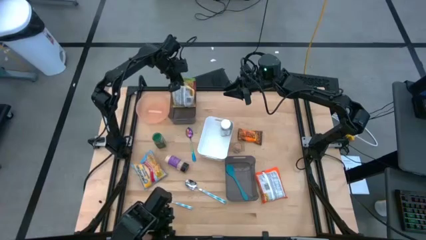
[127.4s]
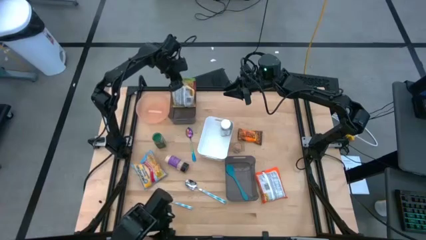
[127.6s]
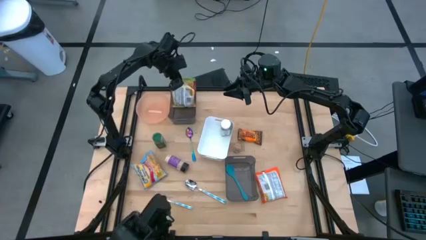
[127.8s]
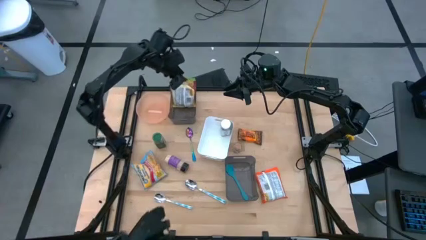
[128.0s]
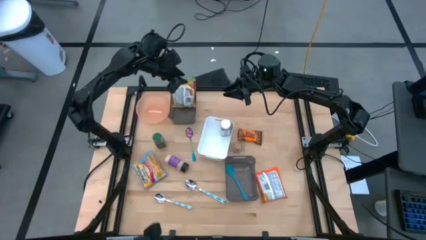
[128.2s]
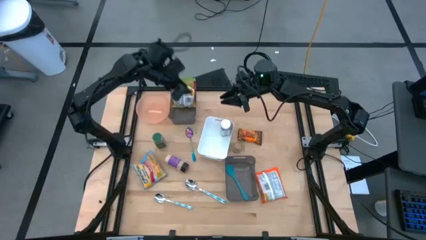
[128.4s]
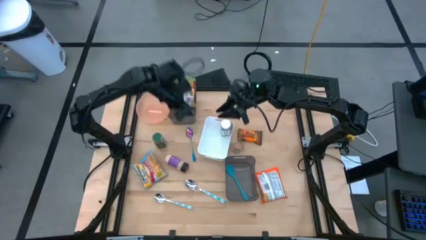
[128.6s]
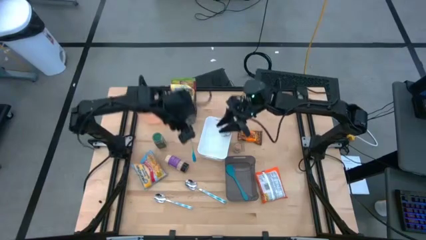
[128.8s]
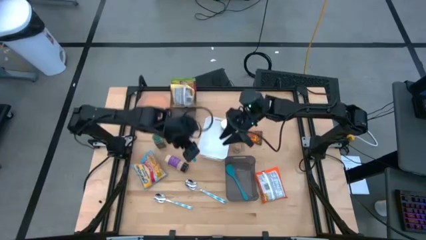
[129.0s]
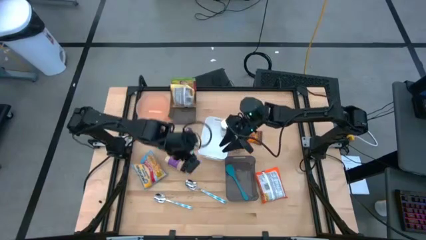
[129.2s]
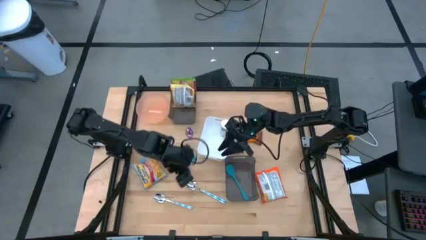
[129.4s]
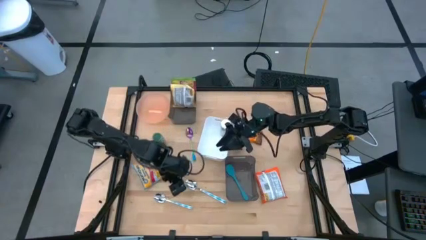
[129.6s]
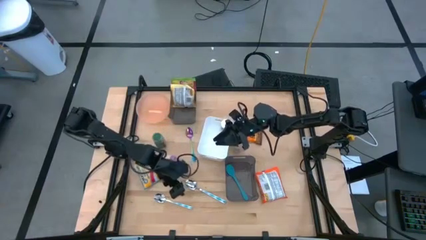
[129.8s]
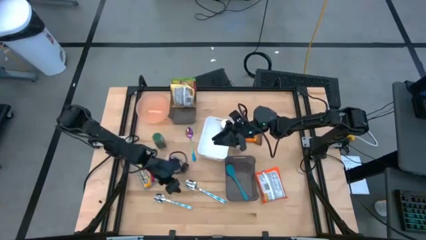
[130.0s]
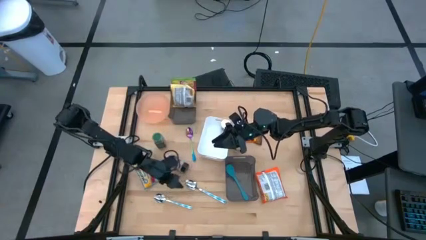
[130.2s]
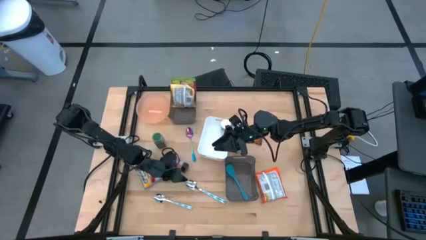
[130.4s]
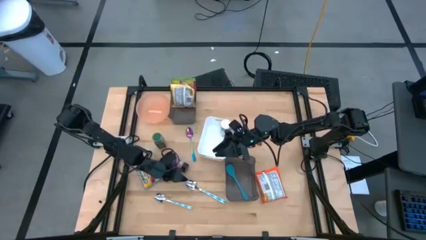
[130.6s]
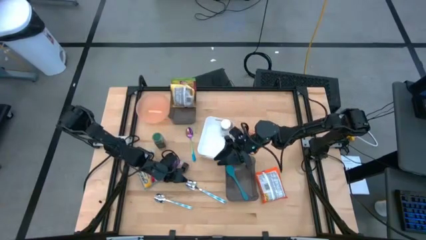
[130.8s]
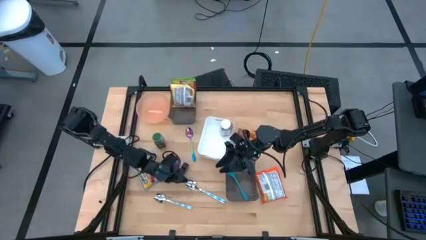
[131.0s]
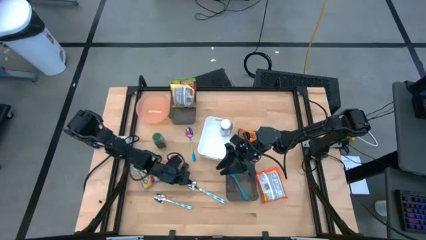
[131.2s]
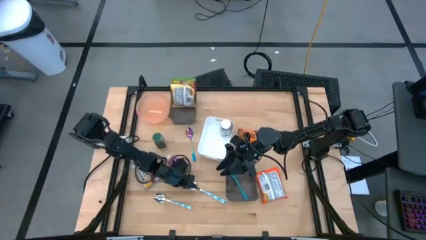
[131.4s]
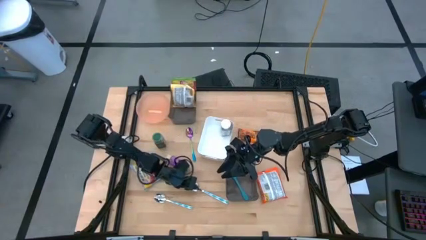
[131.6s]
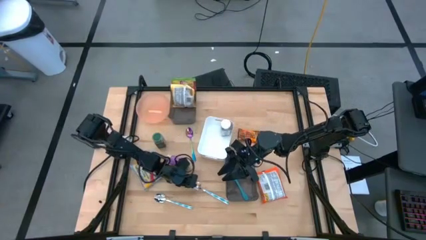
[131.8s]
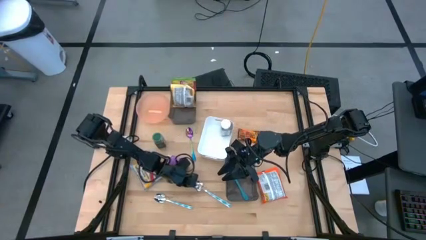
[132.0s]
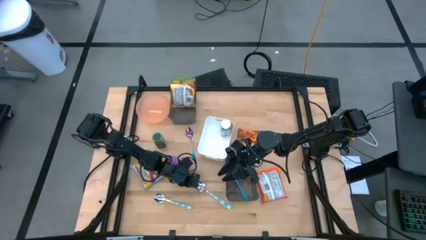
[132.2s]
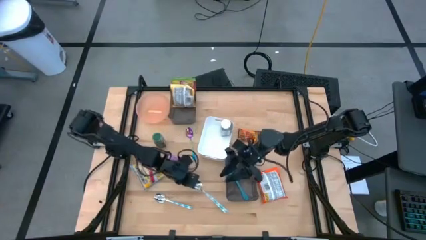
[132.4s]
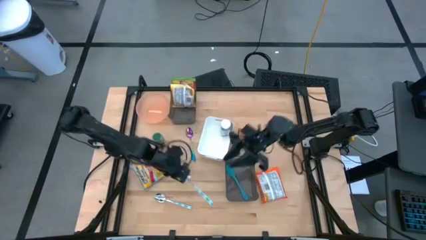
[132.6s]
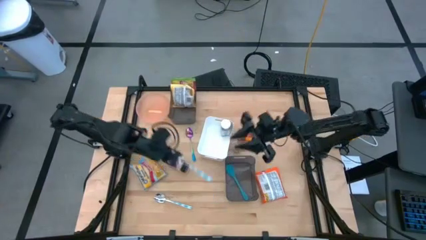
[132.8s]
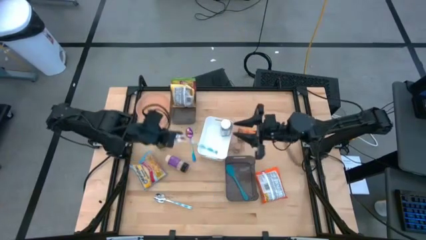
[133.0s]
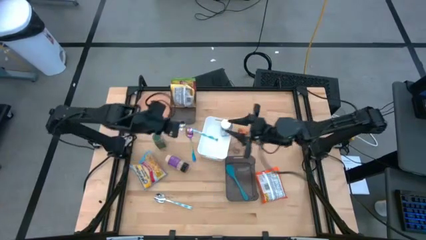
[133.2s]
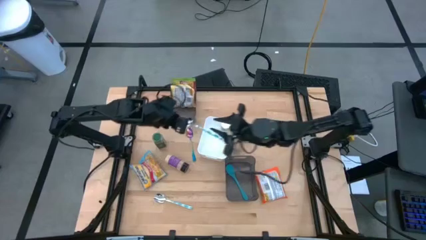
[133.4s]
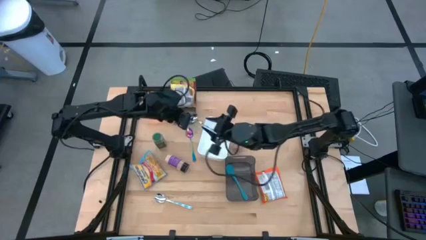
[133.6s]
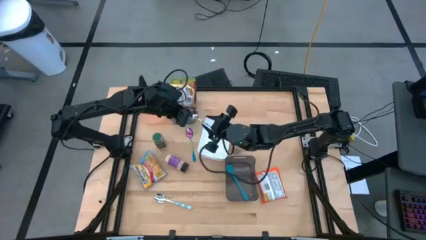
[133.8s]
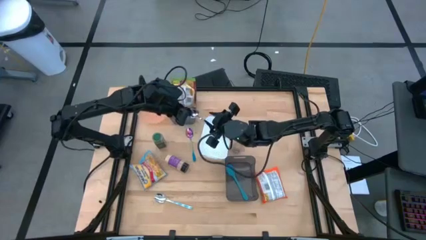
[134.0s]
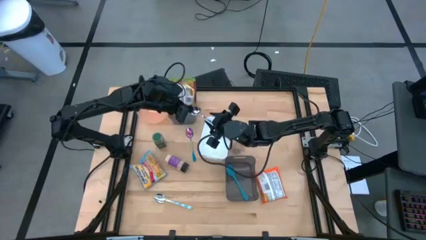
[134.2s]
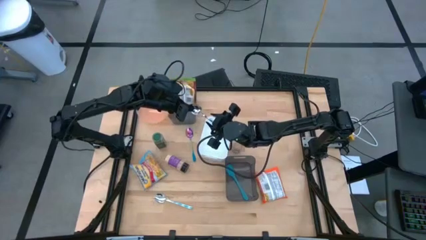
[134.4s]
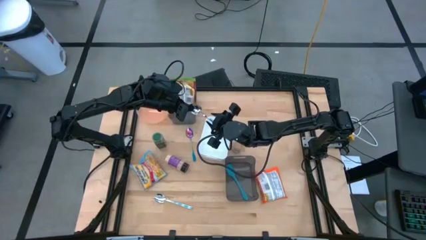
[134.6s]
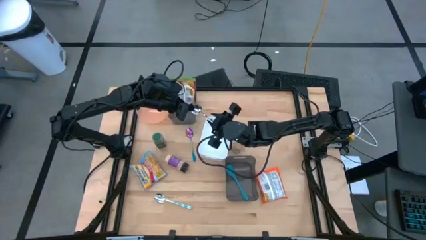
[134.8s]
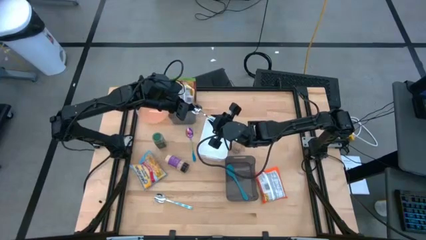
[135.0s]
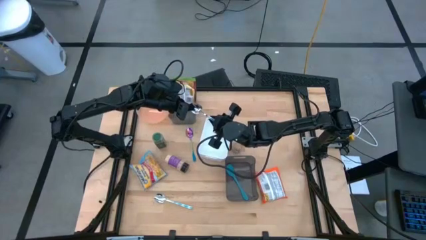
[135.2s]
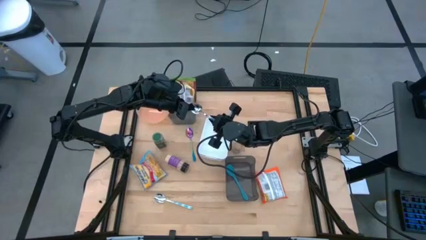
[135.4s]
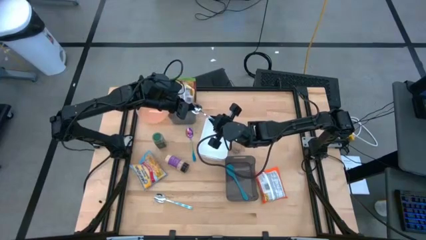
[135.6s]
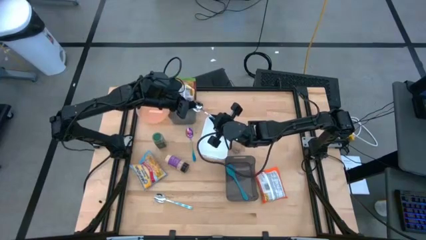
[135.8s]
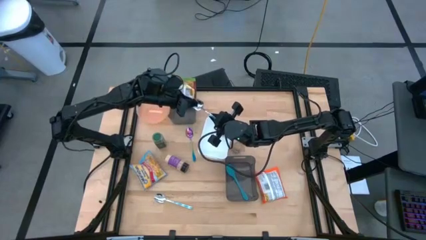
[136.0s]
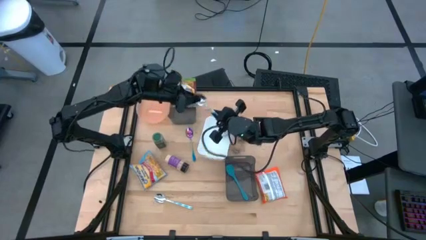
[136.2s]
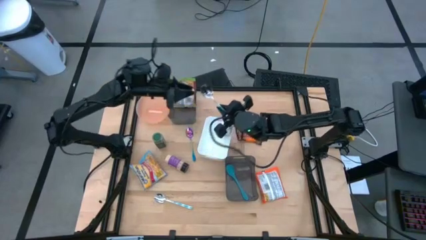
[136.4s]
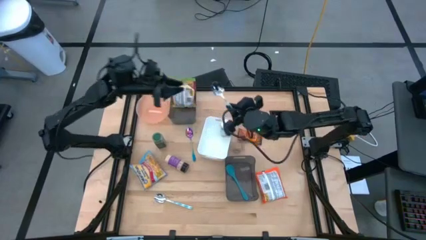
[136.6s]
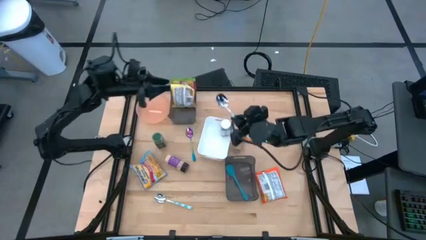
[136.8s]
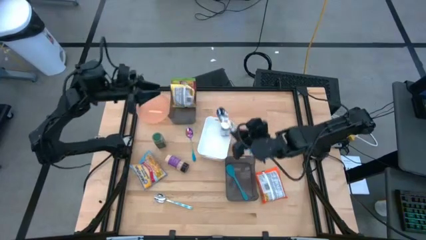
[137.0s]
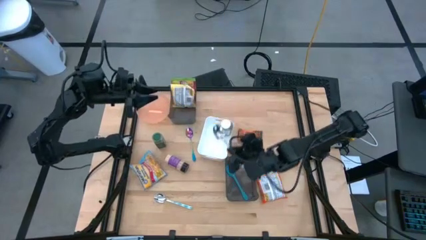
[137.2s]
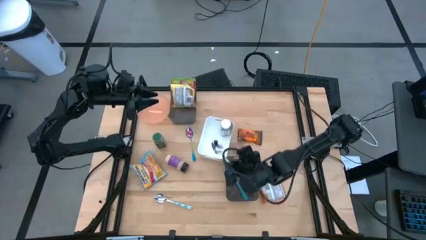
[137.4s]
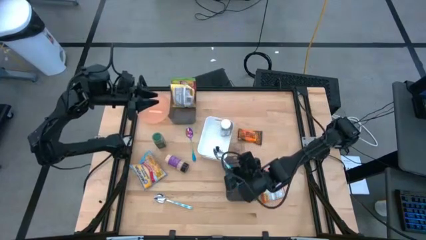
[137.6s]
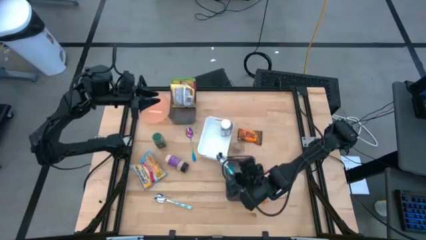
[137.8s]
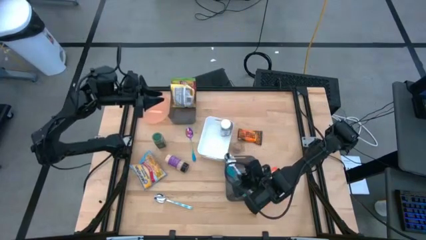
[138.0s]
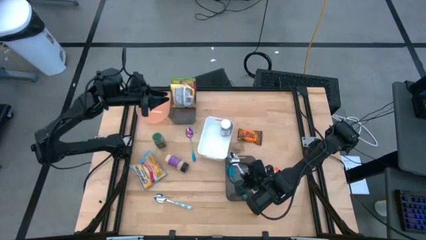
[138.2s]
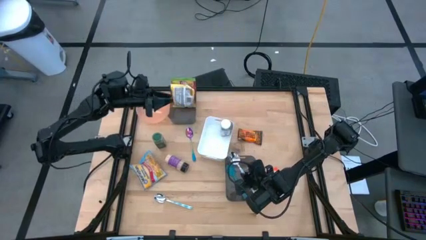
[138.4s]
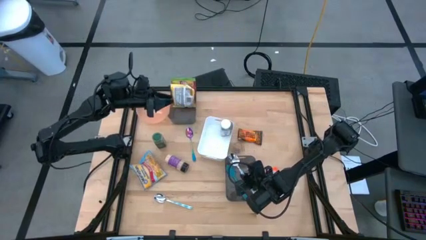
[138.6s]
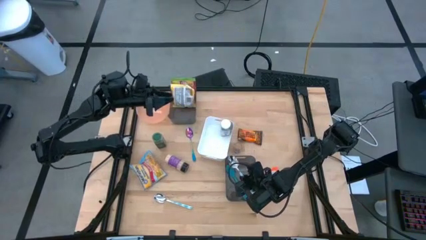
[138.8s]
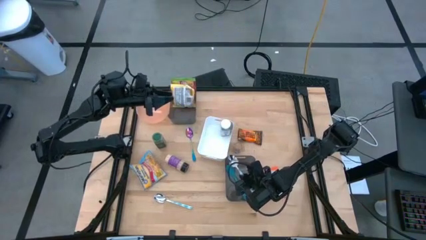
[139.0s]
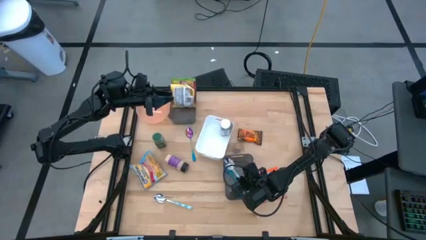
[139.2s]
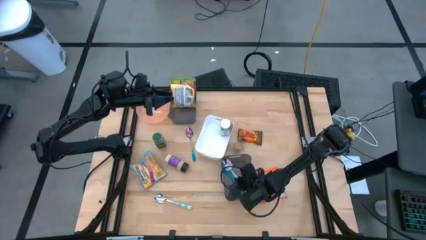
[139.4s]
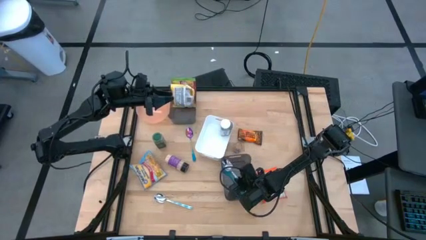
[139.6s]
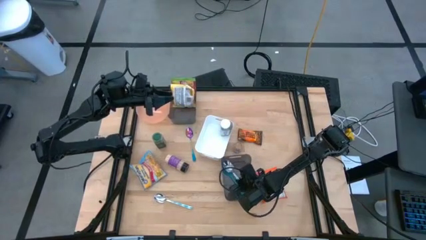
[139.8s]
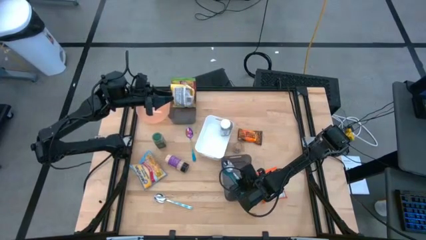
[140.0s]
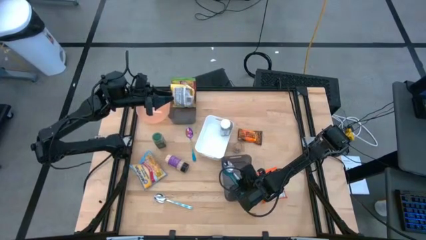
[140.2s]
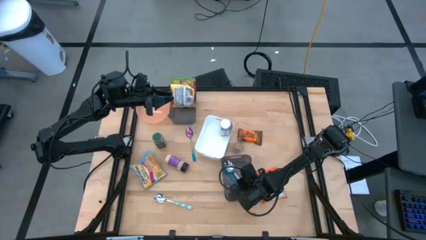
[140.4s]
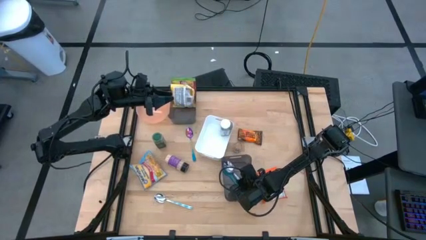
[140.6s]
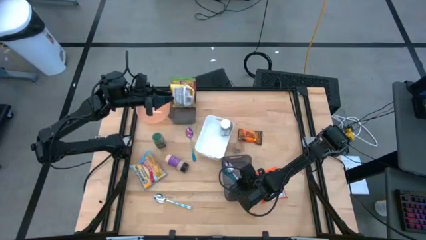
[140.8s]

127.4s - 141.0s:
Task: Pick & Place Food Item
Put the top white and blue spoon into the bottom black bin

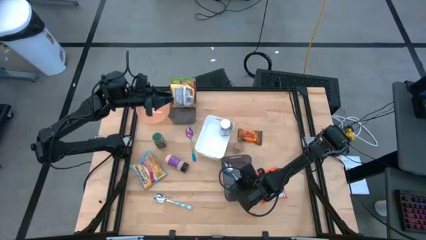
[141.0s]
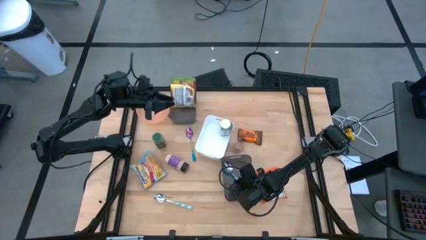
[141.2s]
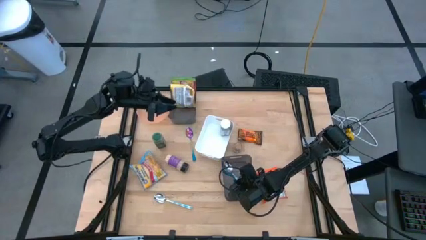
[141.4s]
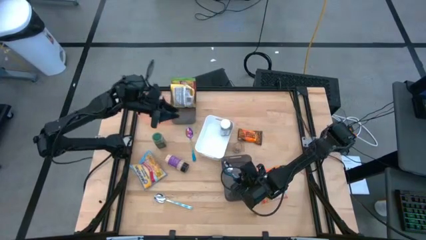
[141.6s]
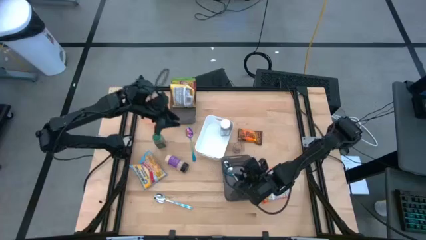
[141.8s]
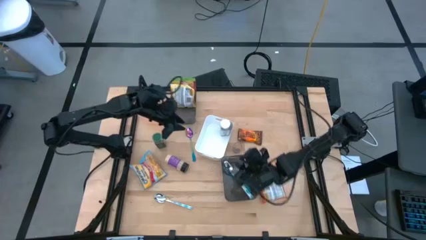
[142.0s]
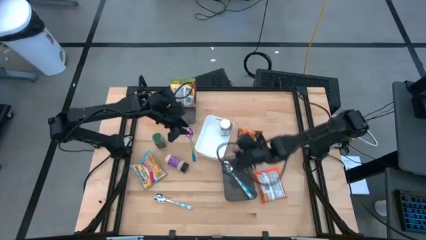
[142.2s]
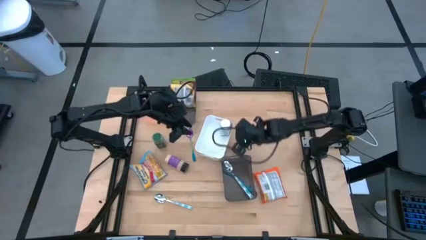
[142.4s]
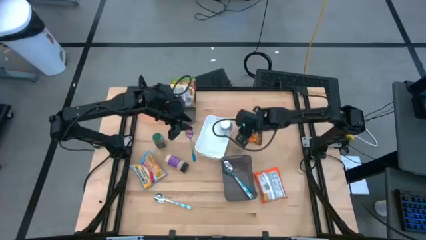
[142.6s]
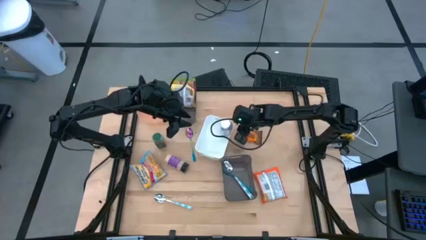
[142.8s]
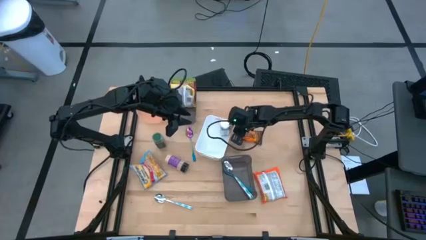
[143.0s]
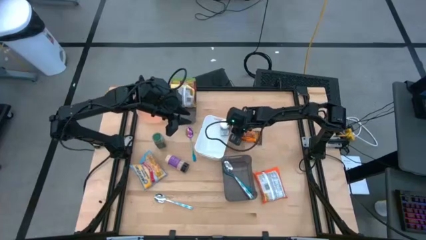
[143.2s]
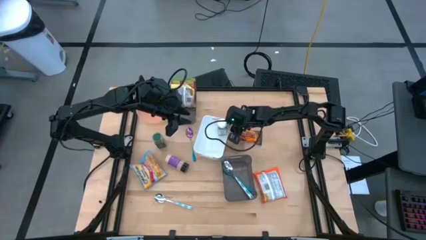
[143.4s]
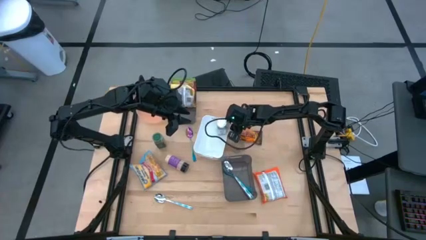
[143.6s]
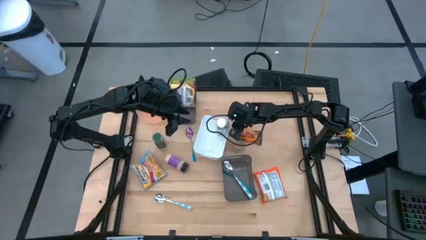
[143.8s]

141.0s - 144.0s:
Adjust the white bin
